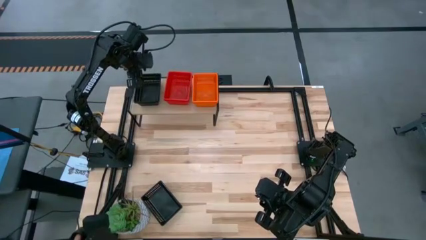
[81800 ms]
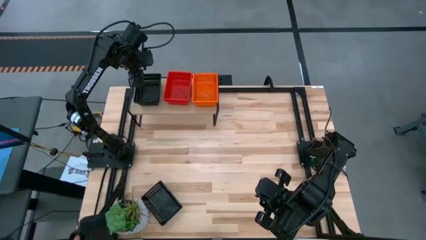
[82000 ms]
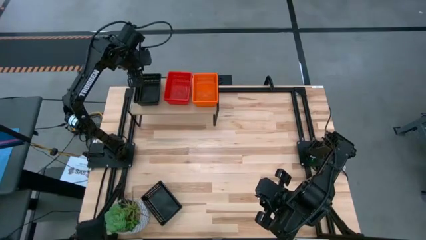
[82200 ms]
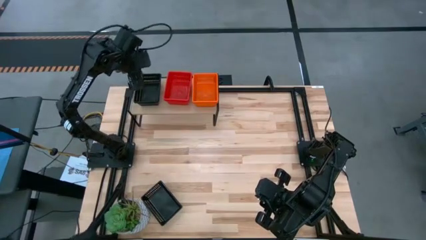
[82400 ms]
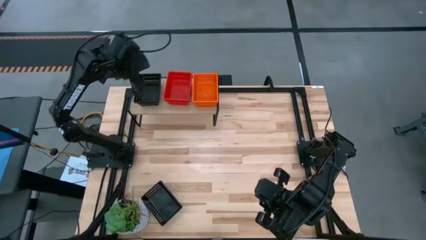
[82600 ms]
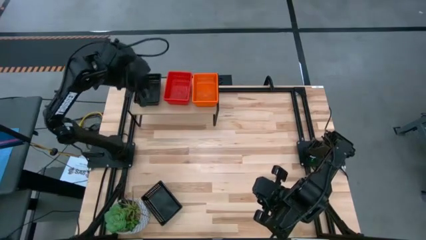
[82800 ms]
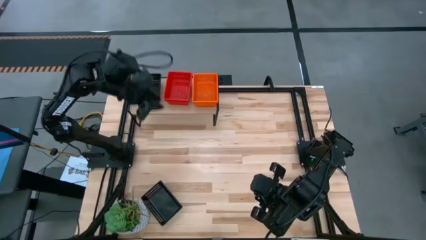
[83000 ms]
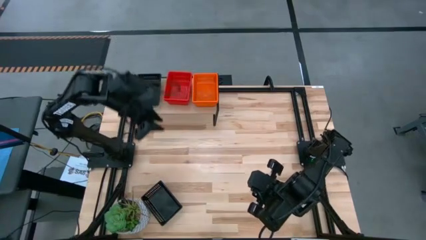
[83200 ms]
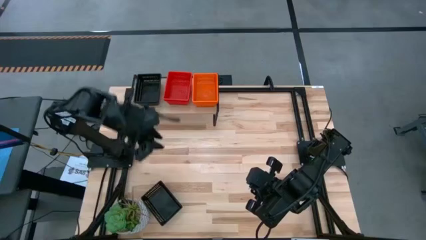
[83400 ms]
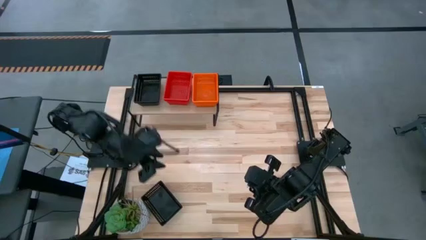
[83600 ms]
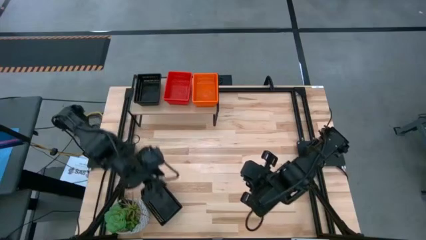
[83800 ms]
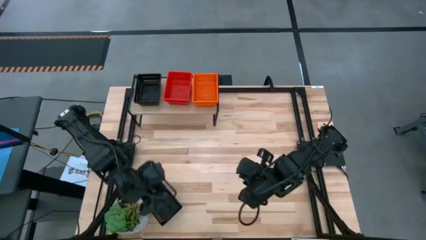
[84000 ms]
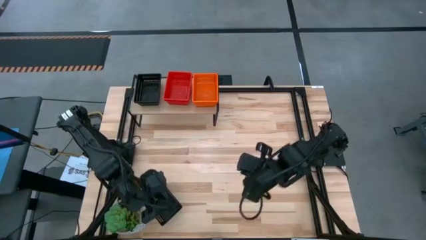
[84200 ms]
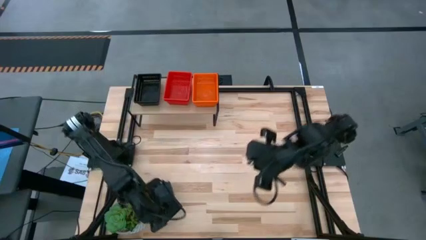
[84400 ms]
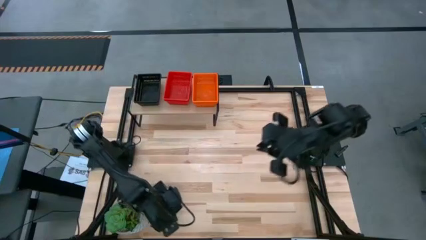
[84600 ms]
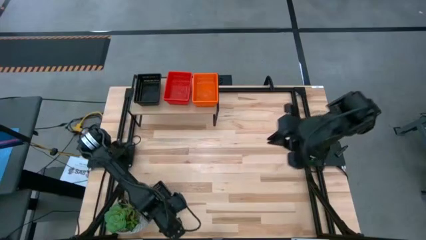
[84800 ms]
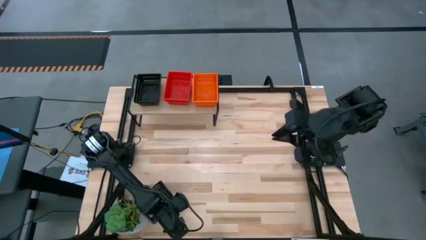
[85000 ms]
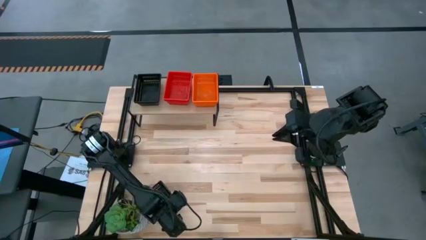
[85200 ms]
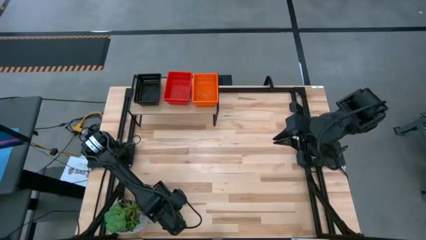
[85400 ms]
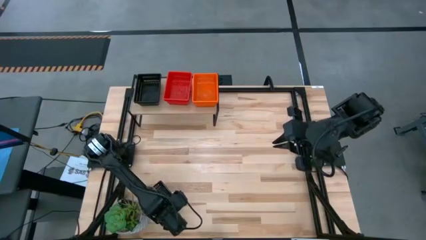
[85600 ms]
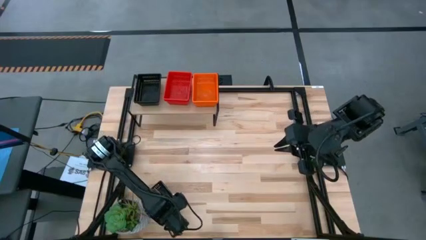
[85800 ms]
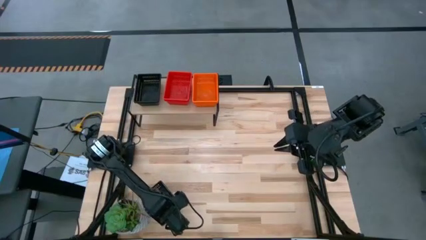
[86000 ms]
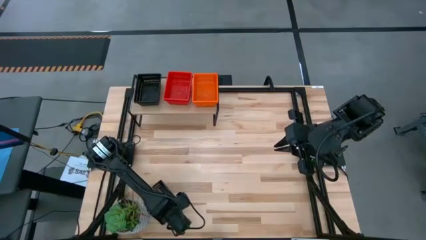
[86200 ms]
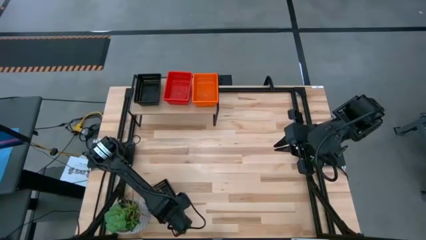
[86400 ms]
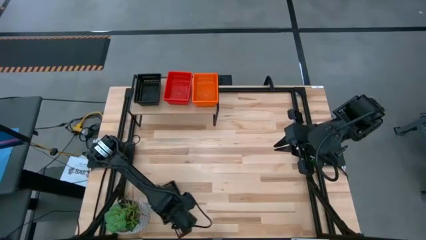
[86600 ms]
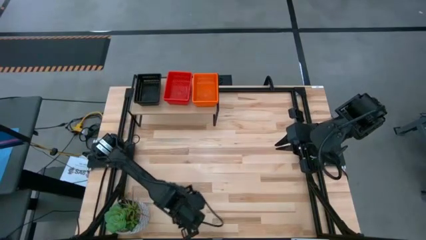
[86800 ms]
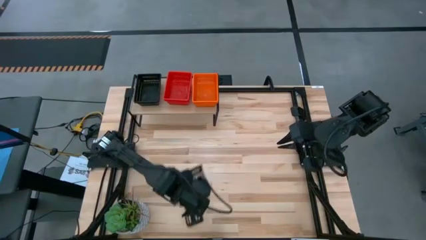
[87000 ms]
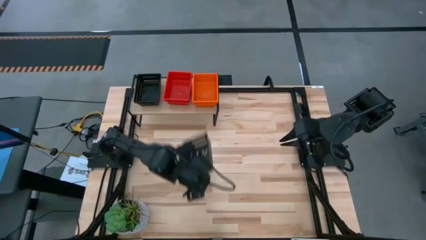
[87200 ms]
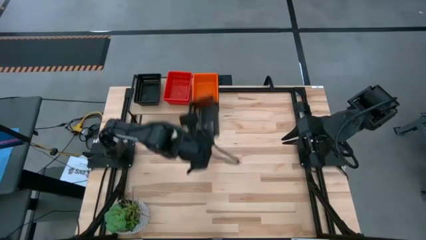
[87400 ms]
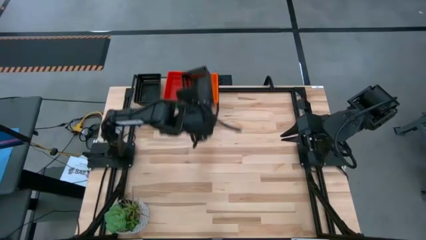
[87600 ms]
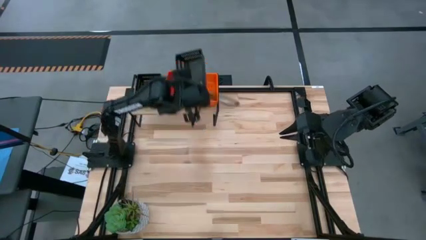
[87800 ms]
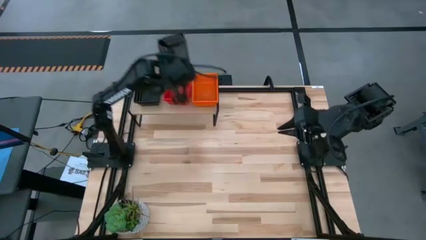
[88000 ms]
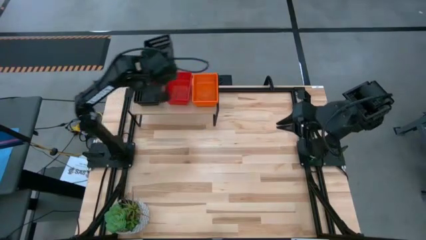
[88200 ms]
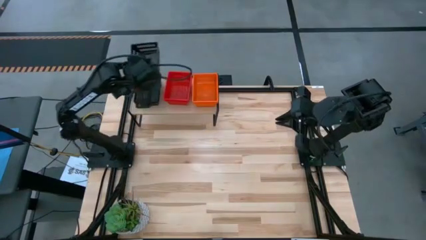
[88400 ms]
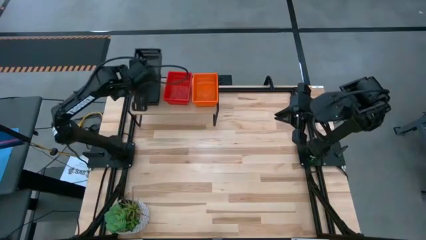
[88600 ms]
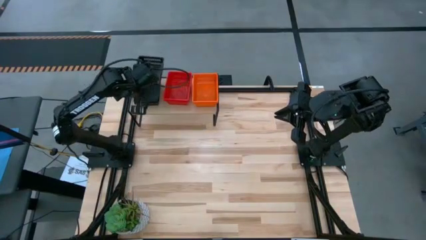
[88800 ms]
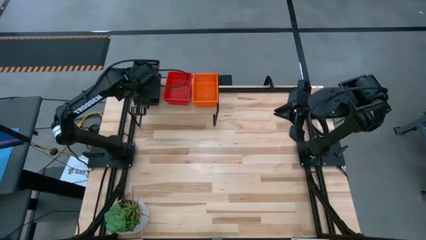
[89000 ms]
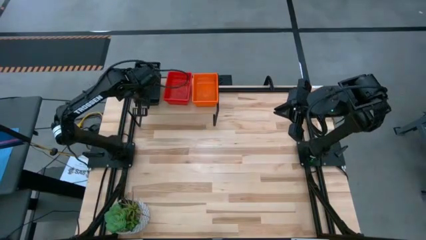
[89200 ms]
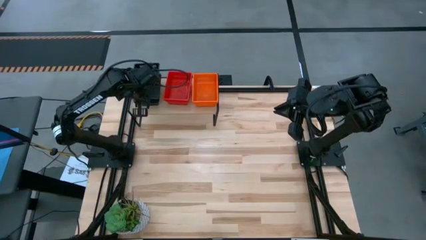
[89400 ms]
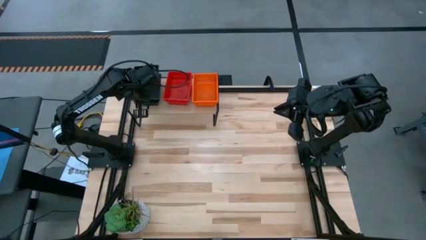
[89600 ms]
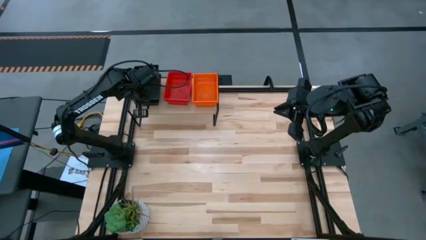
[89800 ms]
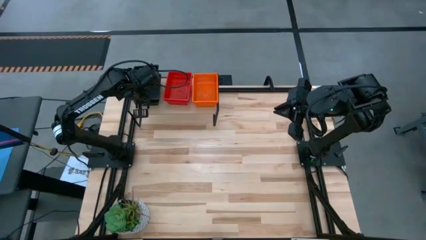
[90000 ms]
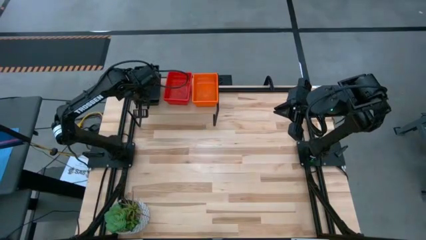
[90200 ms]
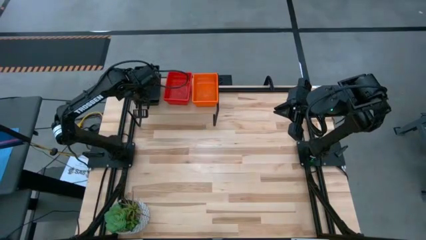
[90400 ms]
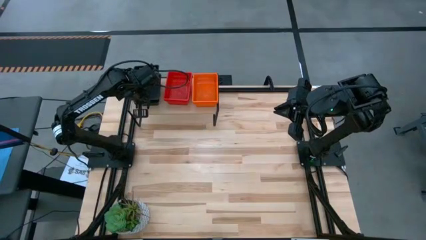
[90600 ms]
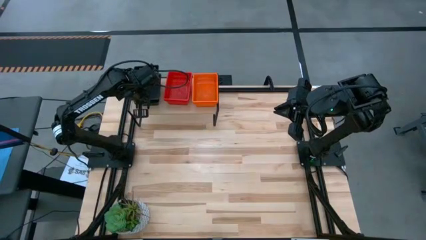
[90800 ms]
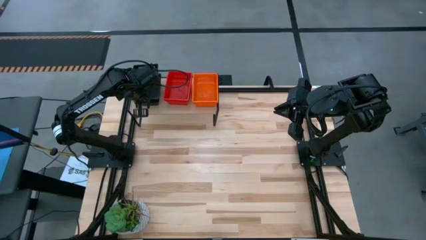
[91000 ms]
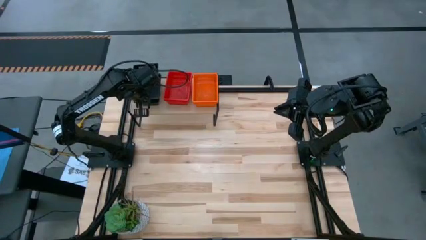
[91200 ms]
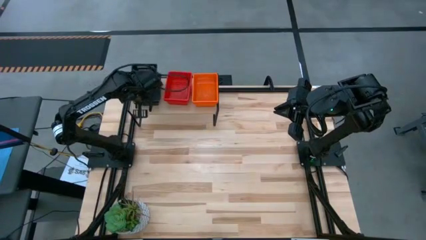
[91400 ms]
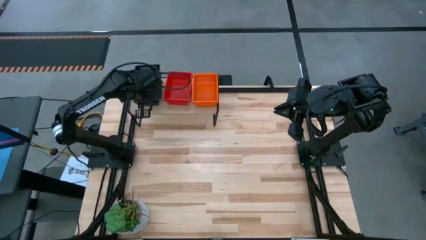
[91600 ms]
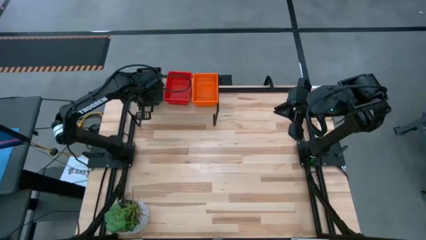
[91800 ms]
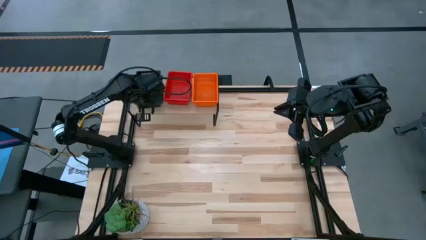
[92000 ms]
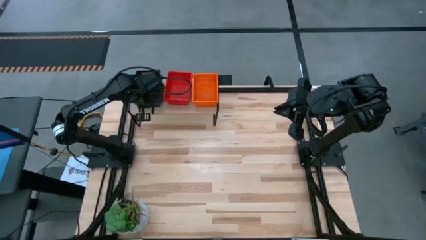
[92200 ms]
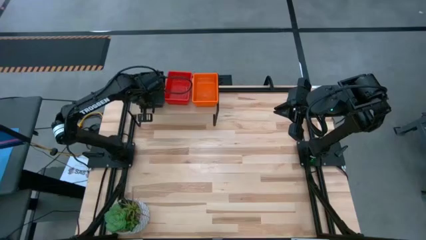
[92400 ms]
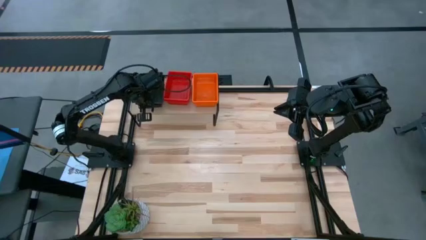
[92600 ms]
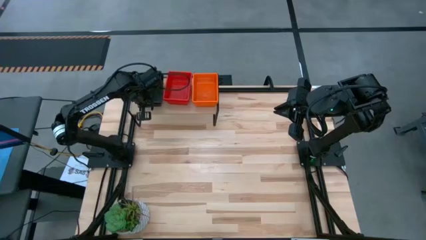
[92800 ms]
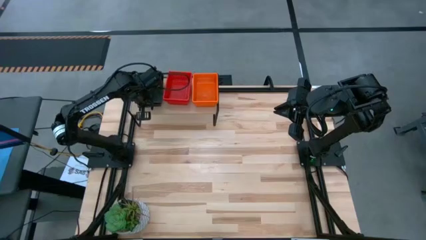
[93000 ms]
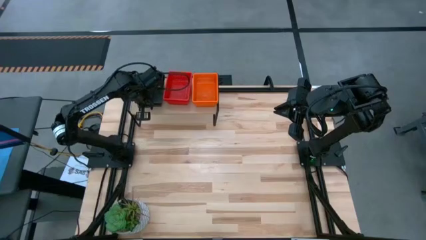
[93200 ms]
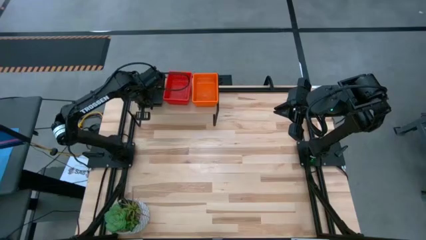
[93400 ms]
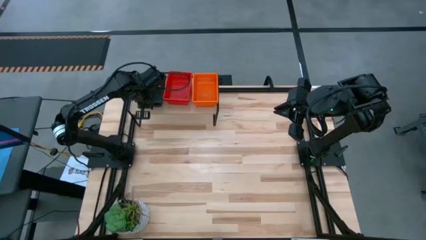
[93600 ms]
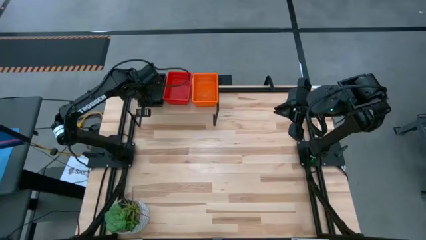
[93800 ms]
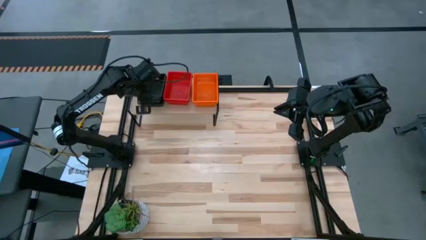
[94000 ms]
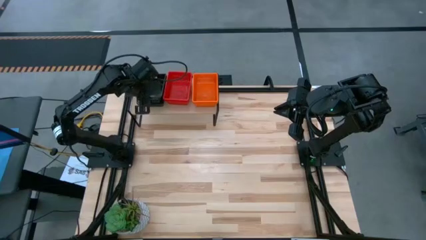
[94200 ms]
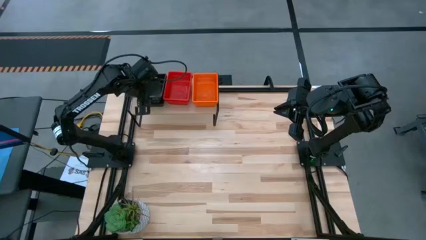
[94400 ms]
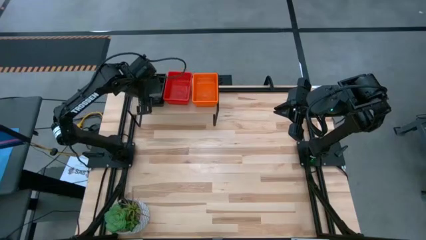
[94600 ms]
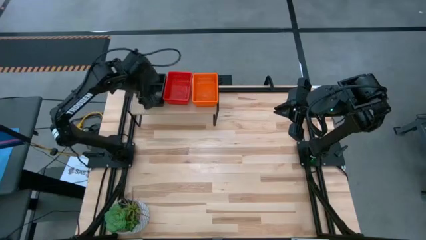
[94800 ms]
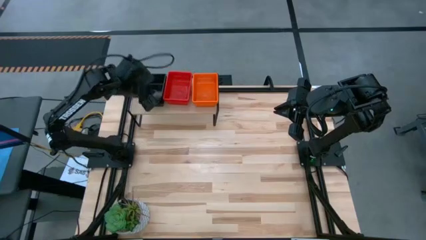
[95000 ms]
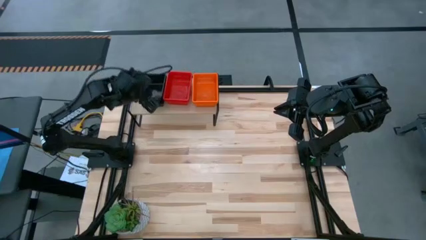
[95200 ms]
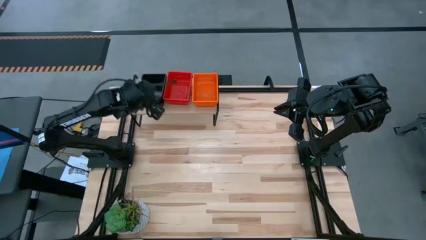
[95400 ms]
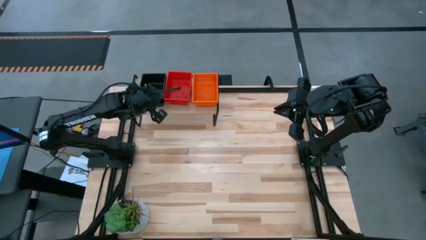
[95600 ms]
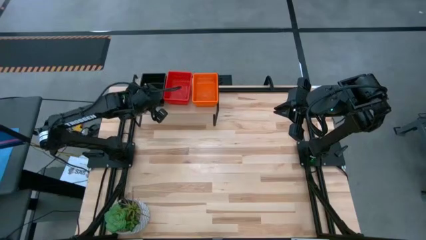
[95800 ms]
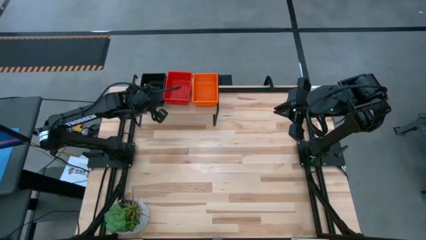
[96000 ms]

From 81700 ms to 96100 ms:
Task: Stack baskets on shelf by color
Stack the black bin on top of the other black bins on the shelf
